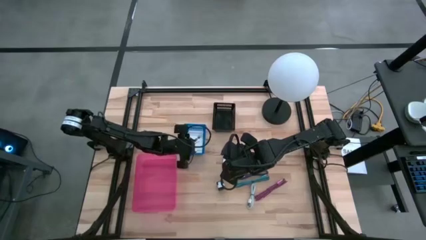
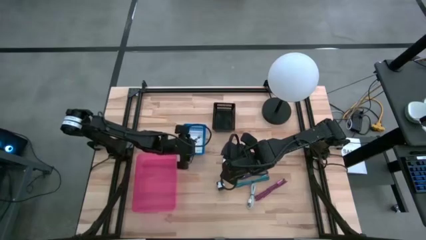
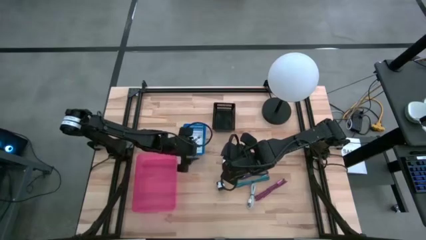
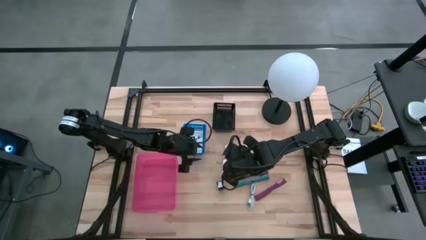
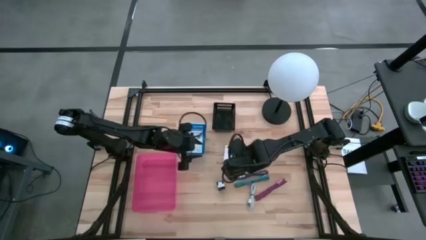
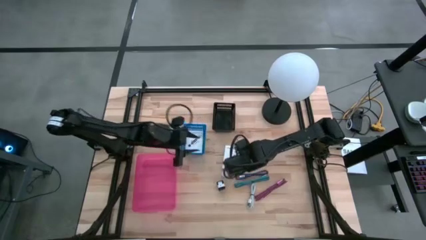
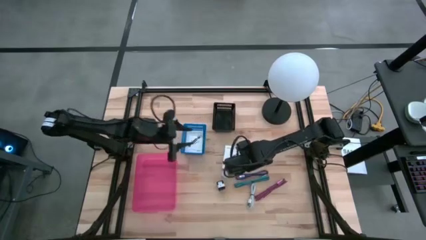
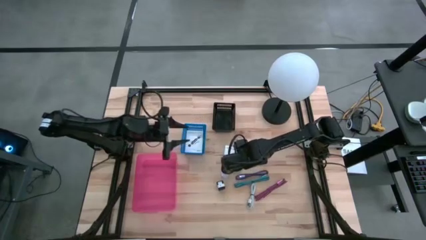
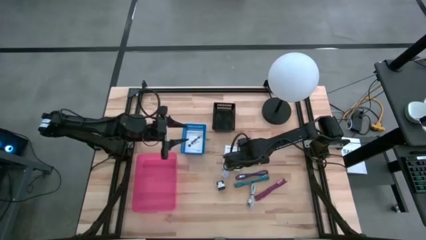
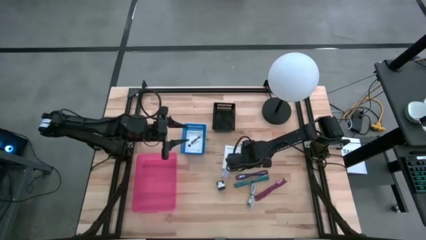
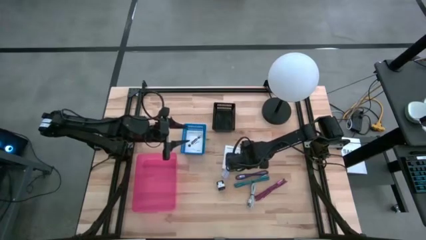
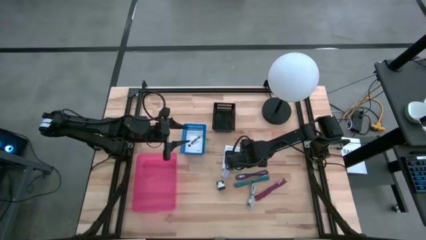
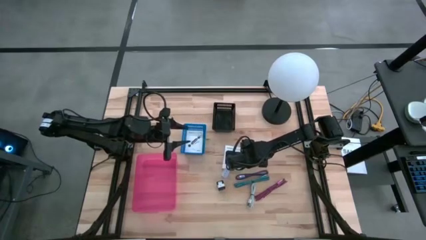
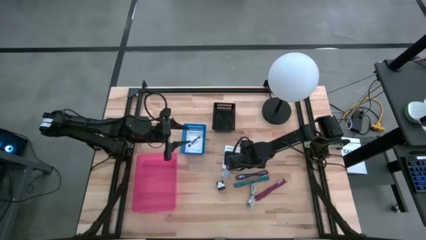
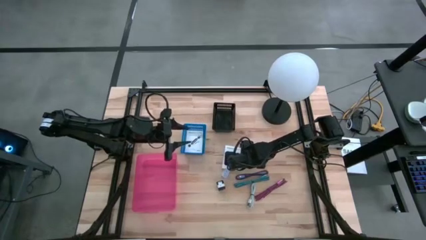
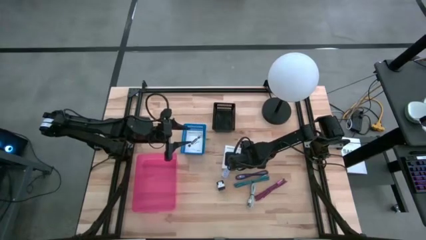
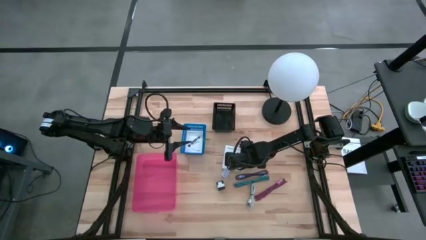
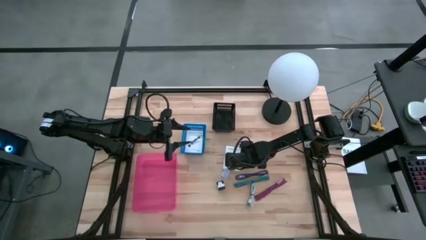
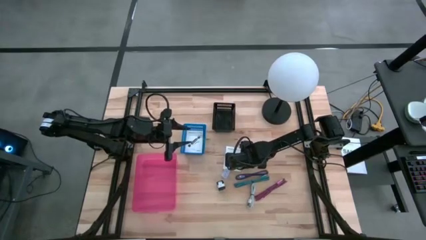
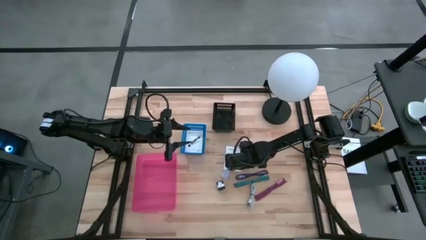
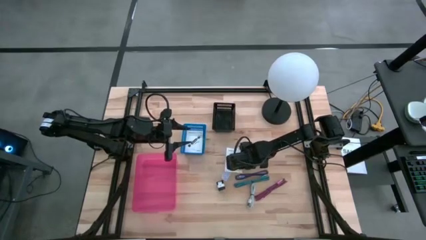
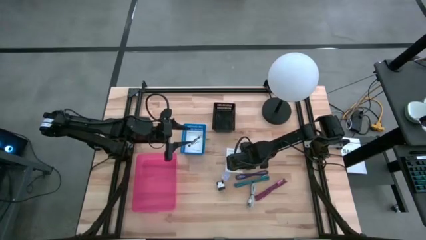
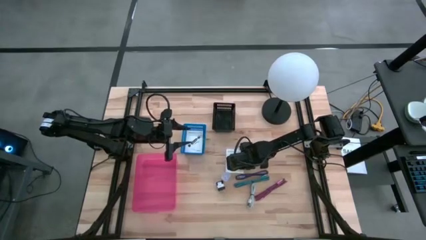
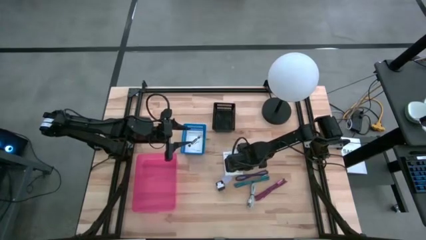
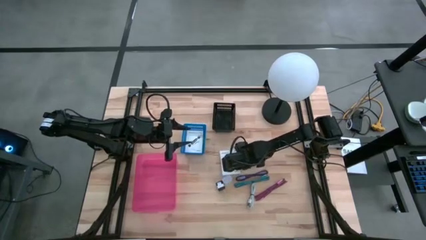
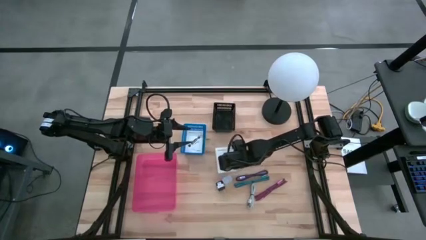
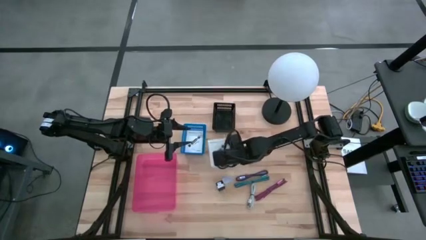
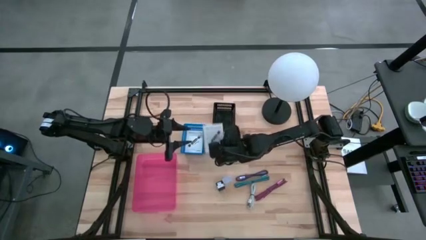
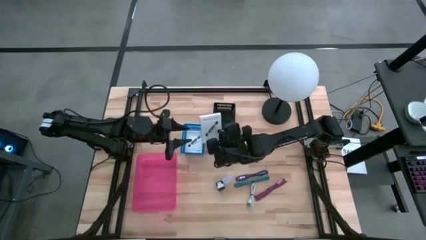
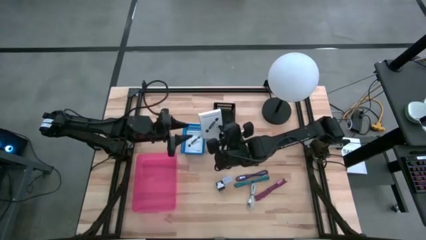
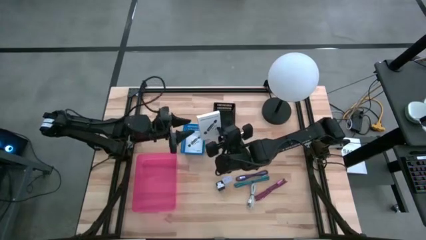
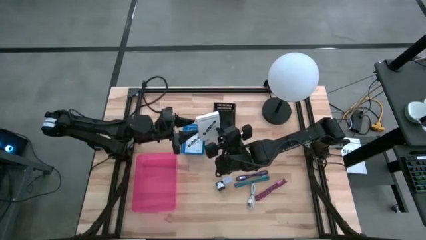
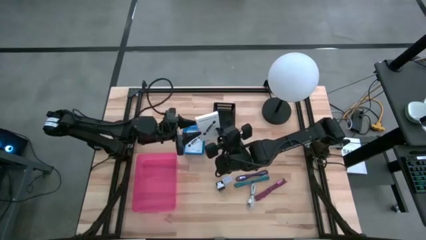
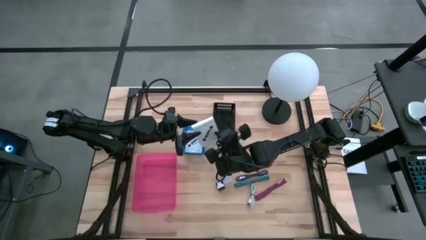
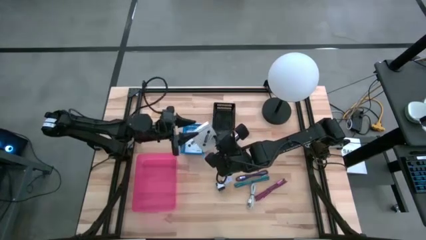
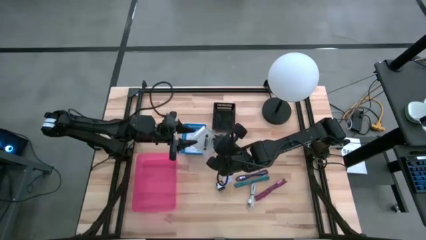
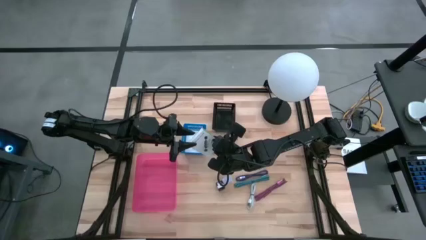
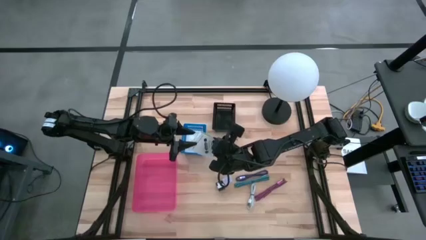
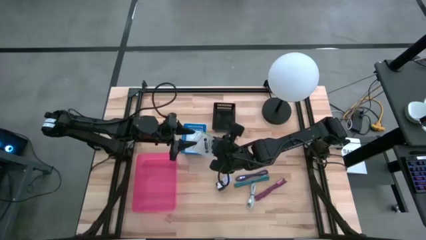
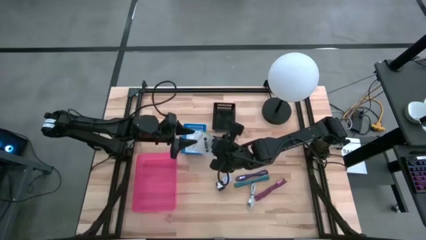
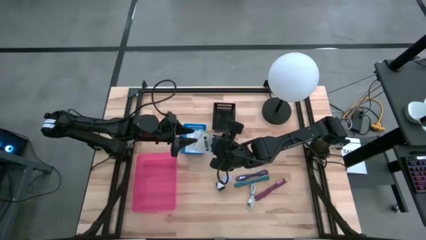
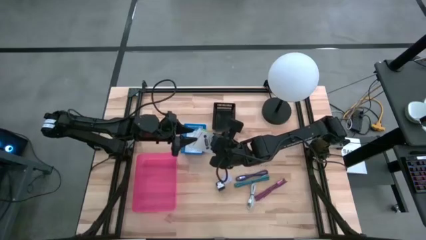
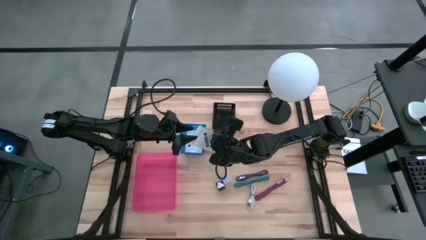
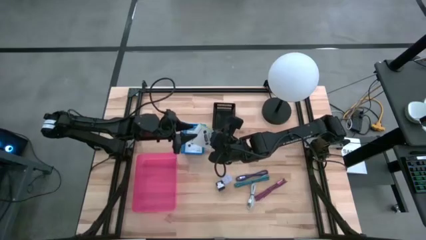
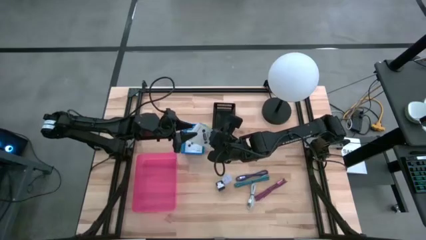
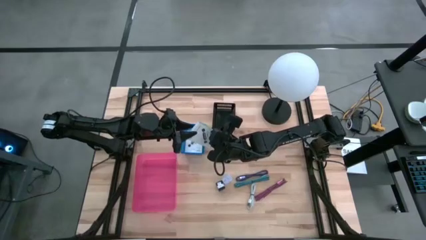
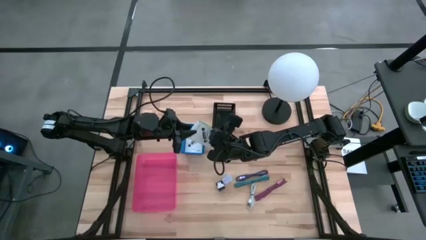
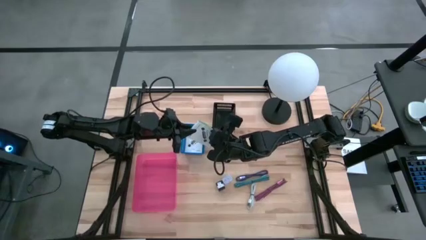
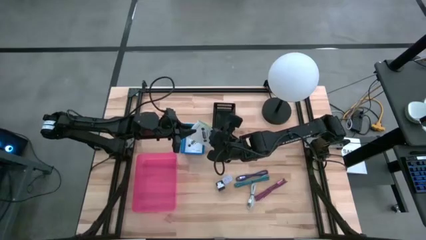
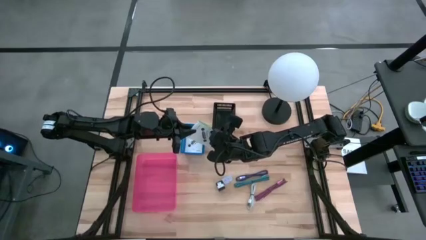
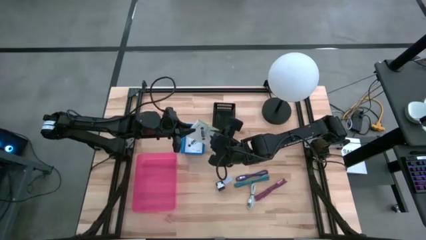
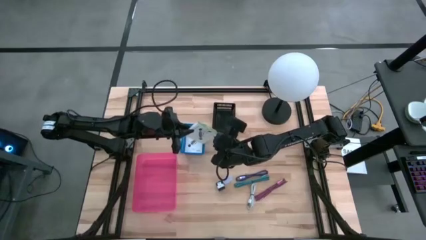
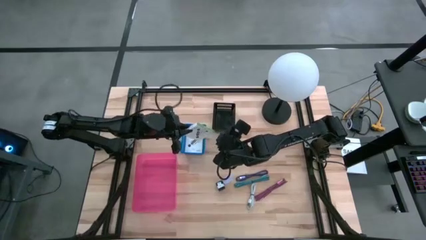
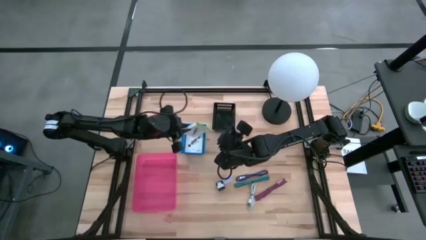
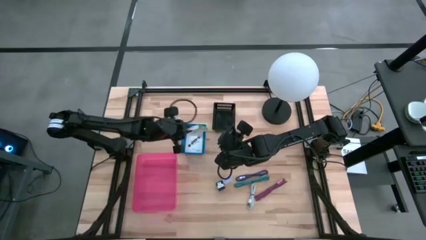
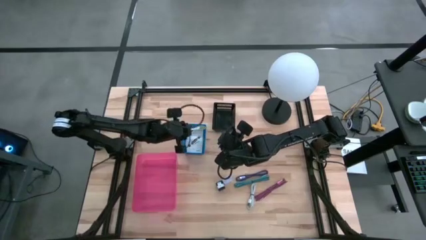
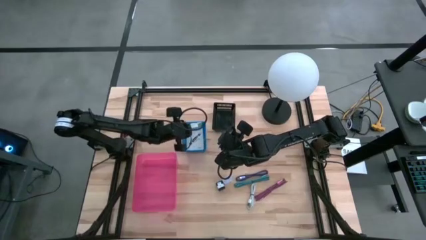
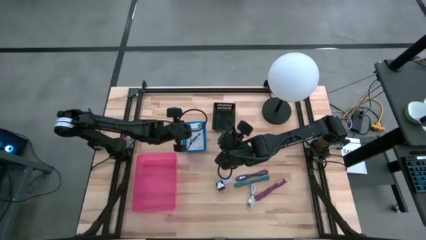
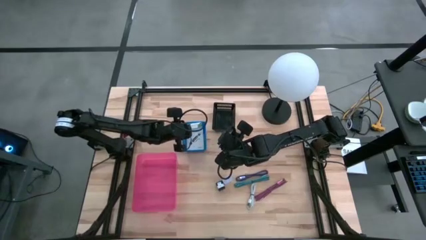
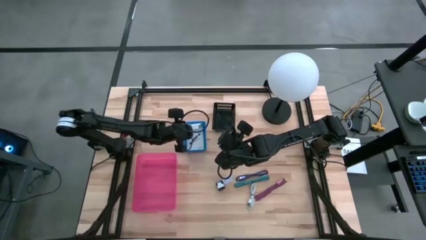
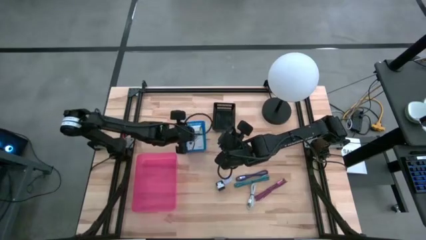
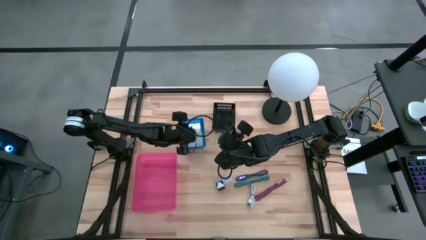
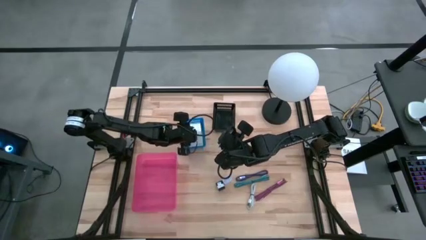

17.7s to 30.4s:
Task: Pick and place items into bin
Put the card reader box into the blue bin
